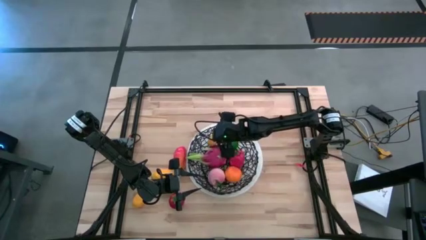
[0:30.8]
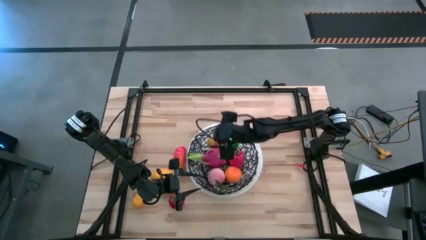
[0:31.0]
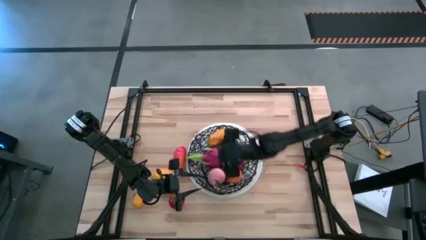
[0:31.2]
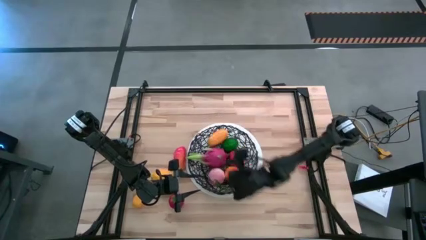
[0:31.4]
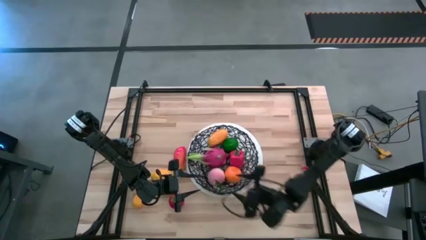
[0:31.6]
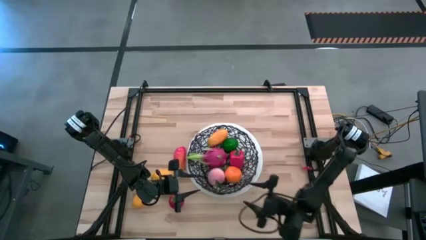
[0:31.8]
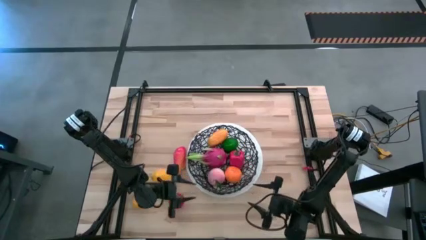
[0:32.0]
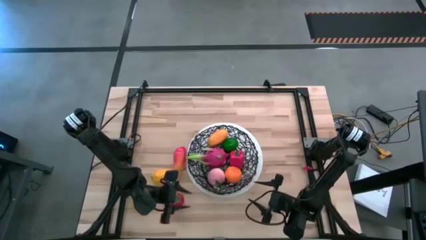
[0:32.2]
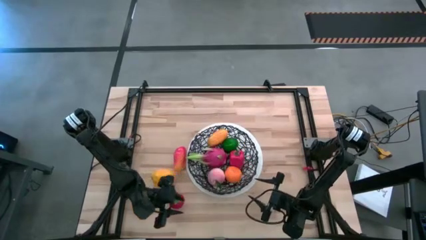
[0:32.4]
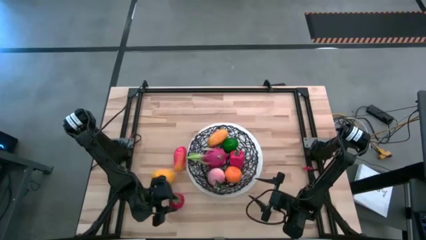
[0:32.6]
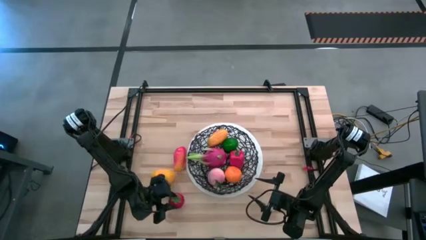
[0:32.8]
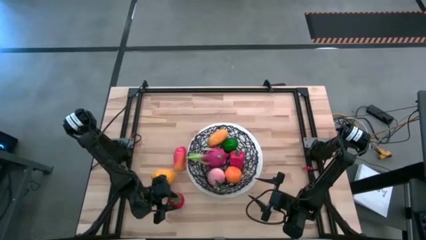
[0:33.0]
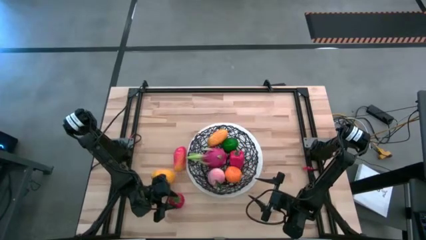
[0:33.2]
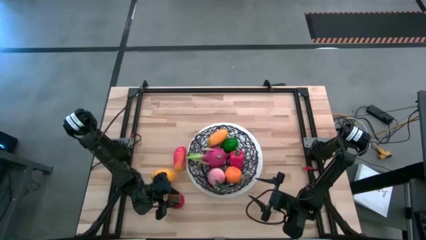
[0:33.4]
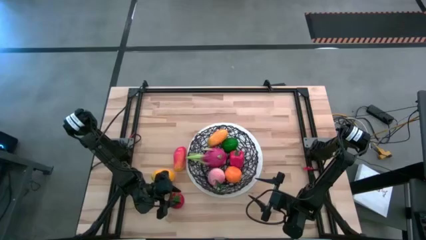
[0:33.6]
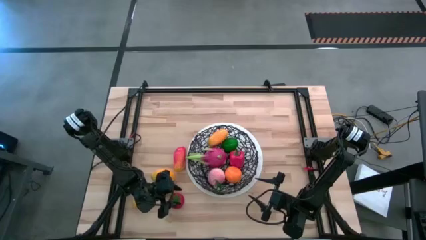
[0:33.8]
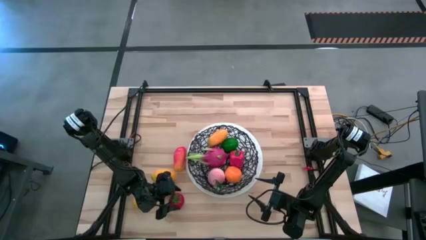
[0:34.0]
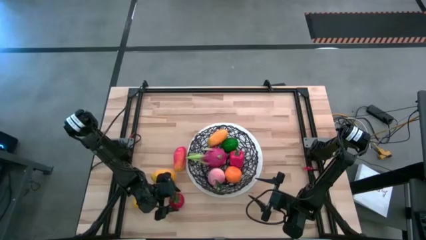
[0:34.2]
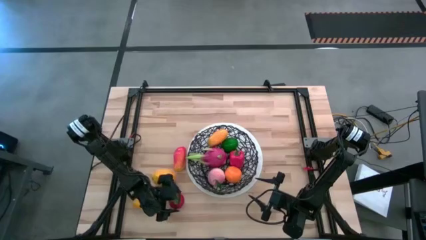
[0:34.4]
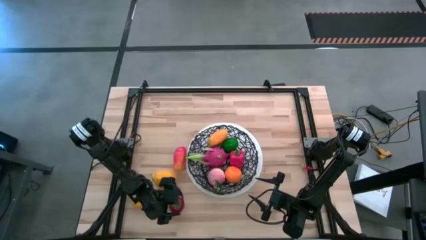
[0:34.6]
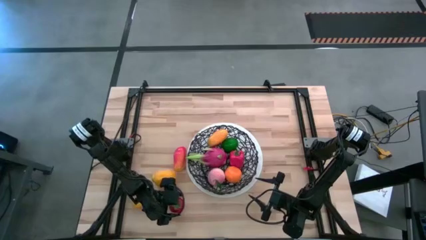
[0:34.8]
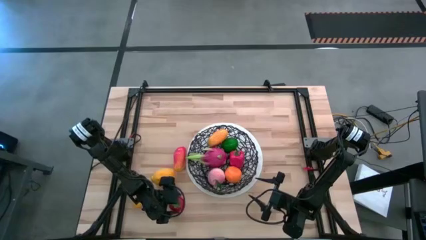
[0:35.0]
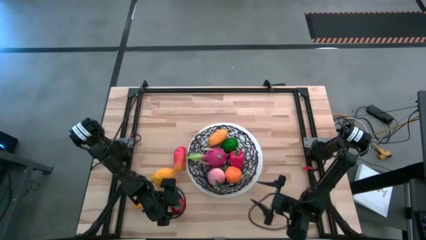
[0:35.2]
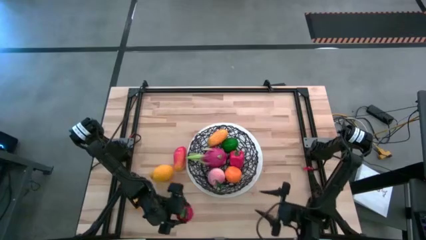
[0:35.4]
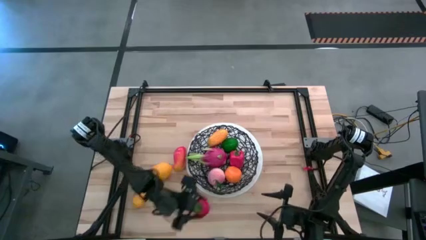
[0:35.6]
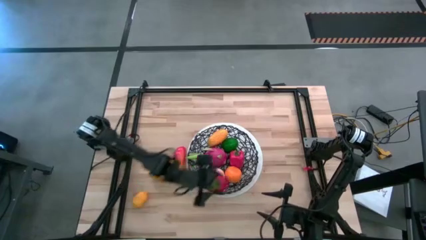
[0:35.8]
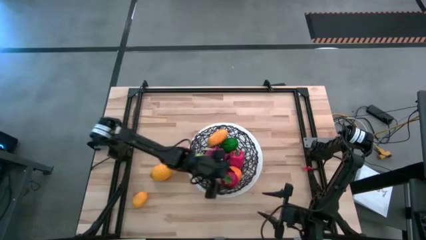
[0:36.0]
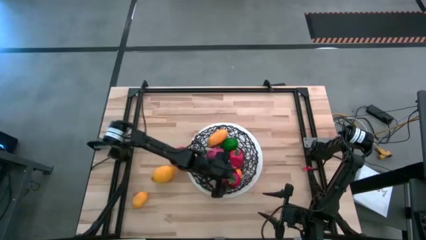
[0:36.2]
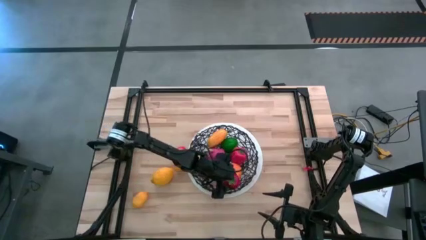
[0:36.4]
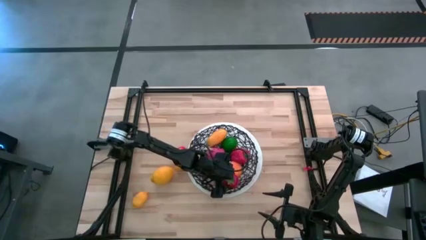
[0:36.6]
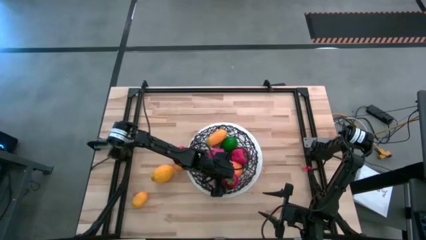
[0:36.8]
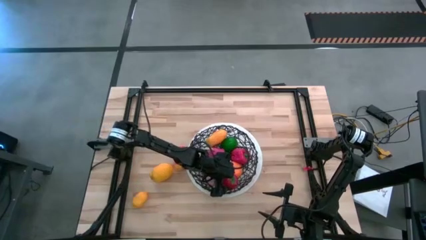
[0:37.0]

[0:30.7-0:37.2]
Task: Build produce basket
Put the tomato into the basket

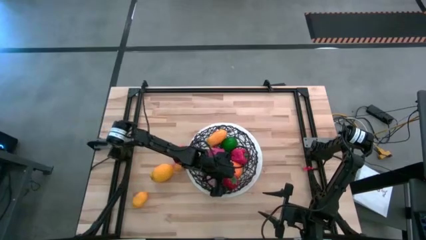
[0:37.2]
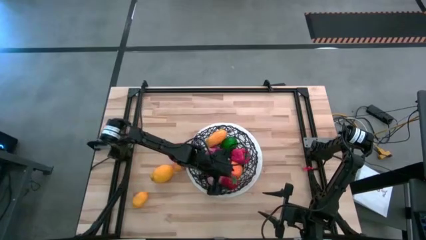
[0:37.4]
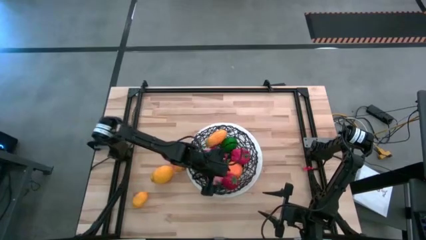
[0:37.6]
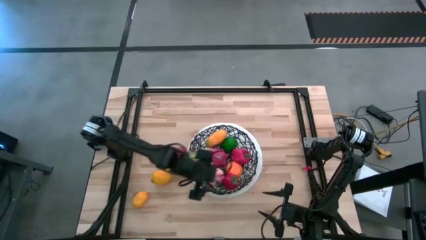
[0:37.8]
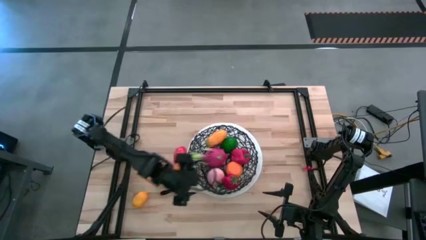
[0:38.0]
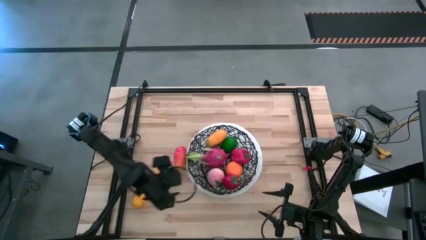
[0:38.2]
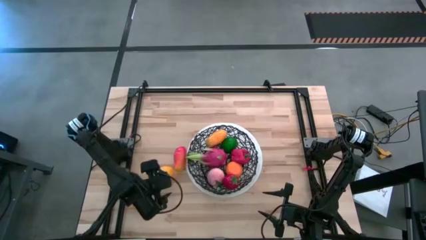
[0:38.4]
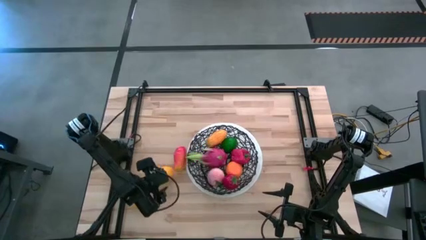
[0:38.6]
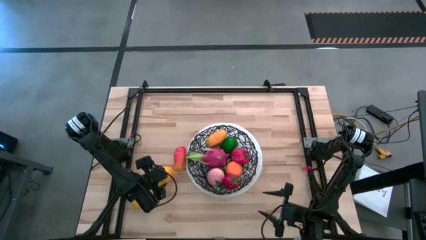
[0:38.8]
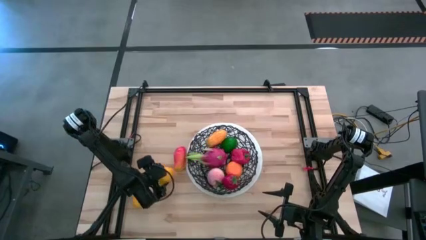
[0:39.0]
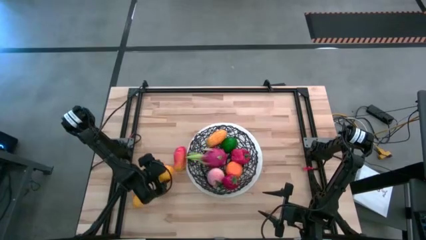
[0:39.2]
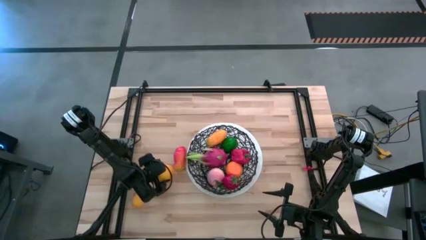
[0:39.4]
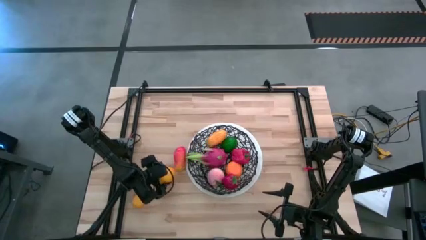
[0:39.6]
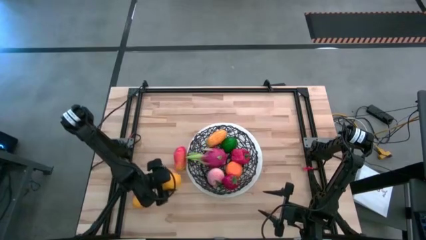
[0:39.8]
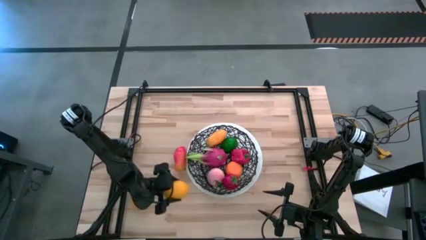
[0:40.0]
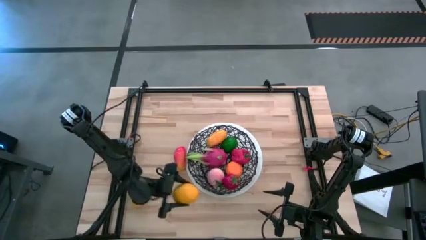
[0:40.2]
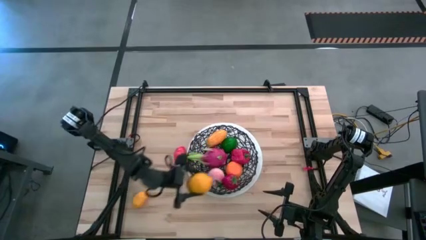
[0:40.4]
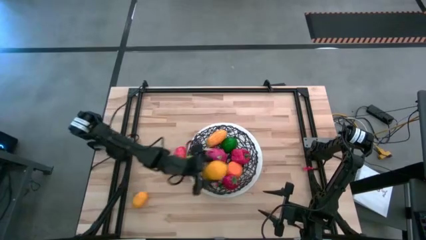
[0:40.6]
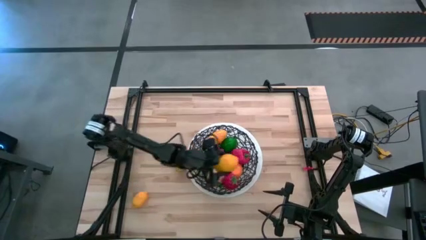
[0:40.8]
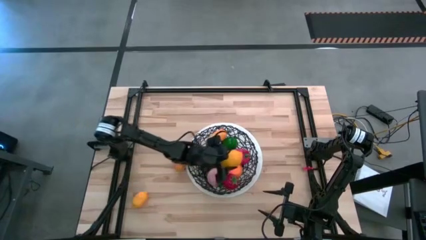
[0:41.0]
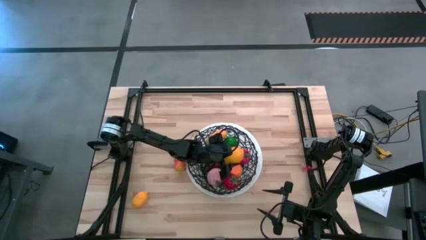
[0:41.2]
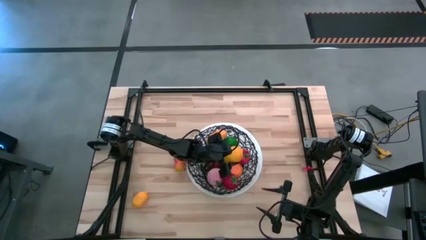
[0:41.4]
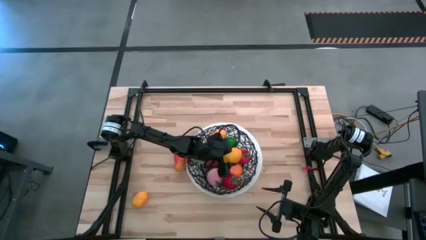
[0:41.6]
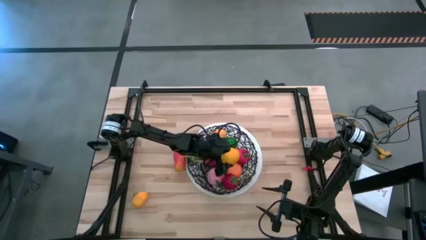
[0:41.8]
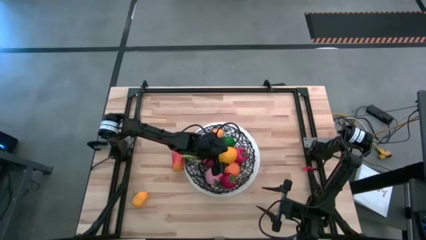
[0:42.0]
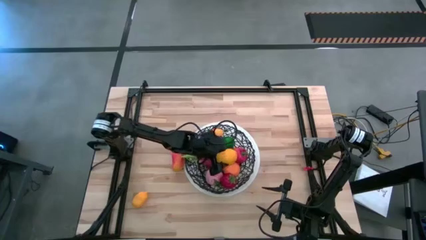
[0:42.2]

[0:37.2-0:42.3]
Put the top lemon into the basket

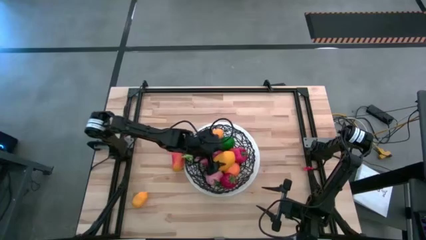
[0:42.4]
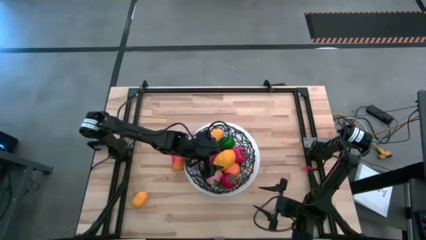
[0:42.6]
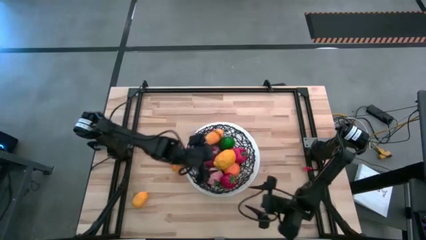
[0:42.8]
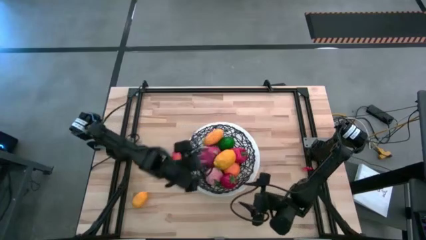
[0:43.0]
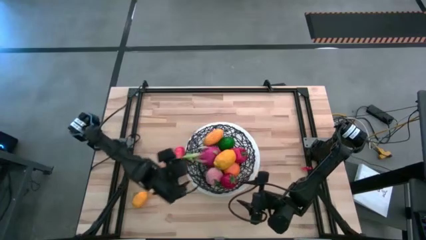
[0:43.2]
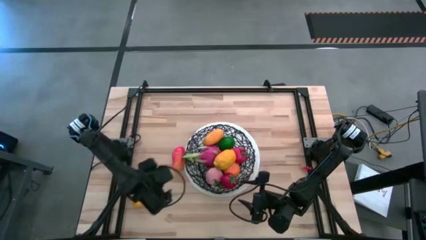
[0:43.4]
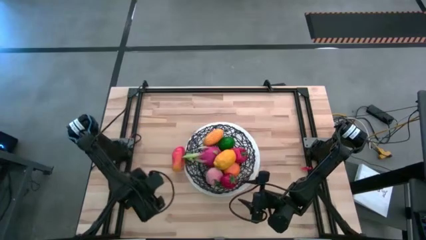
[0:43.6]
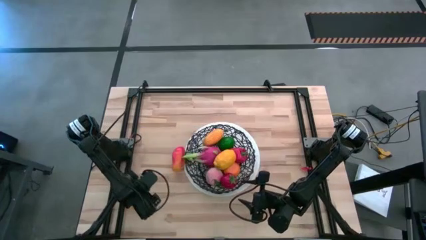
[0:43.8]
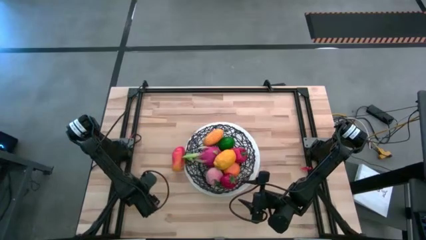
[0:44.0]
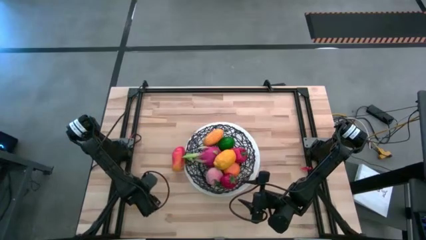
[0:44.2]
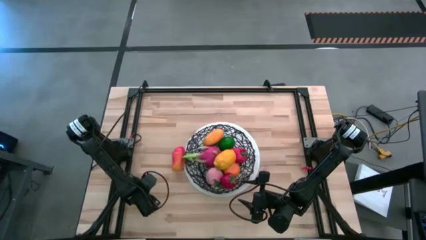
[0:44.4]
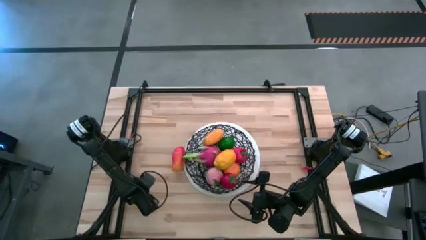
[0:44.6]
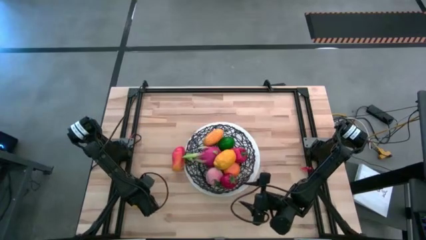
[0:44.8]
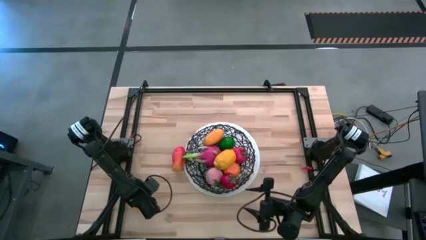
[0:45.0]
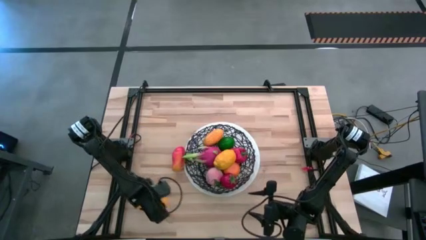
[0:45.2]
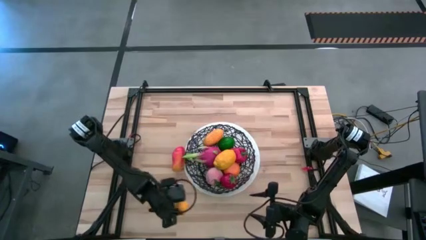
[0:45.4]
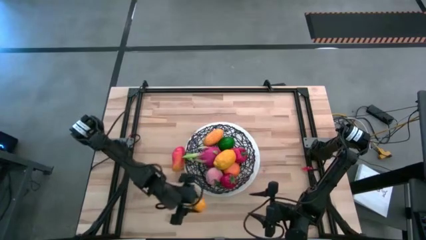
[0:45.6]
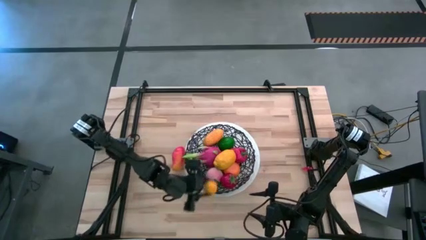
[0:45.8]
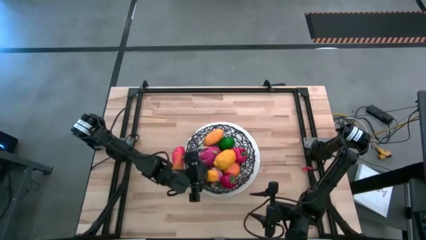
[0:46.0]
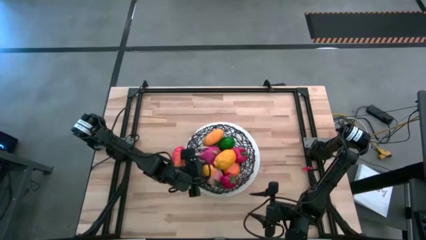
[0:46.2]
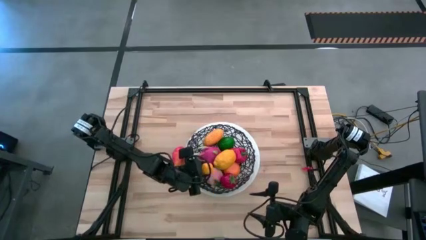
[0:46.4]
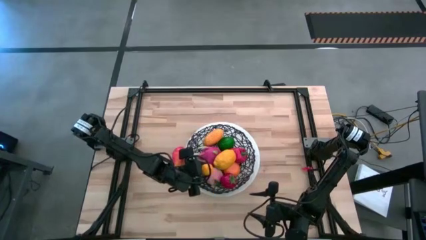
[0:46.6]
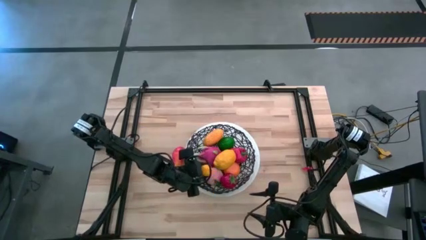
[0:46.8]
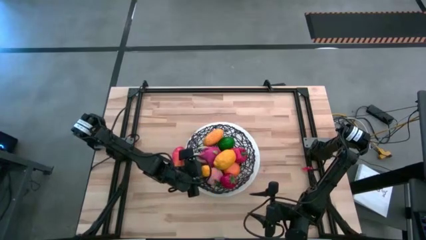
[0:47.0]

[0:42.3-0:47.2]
Put the lemon into the basket

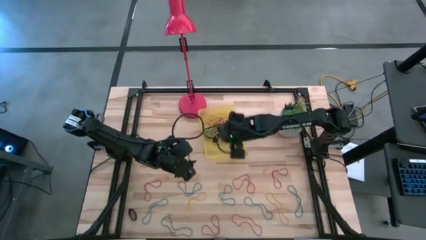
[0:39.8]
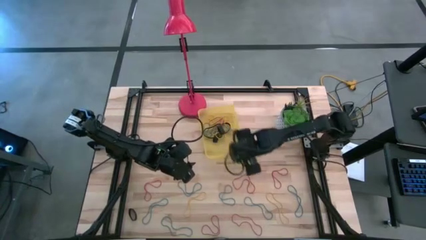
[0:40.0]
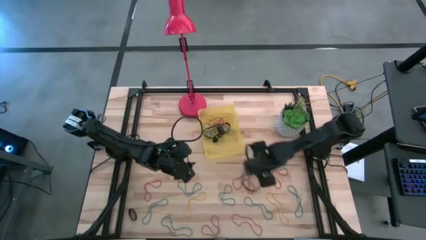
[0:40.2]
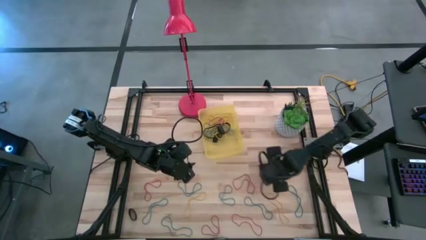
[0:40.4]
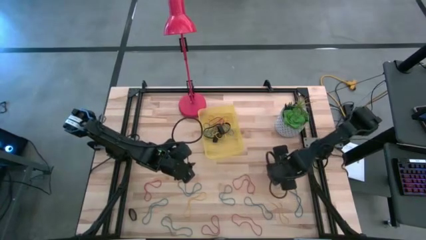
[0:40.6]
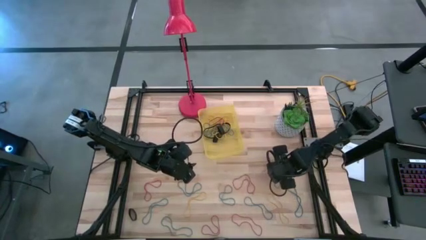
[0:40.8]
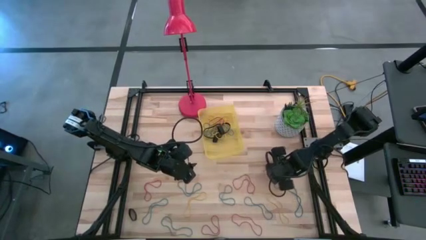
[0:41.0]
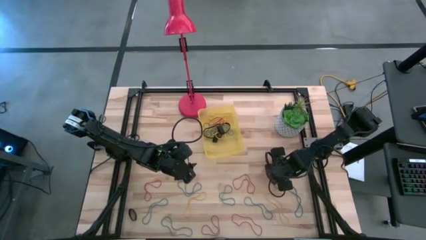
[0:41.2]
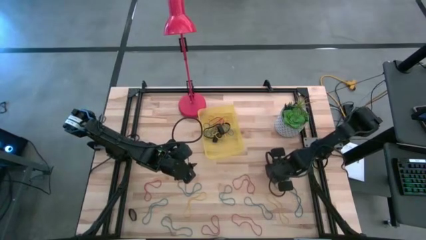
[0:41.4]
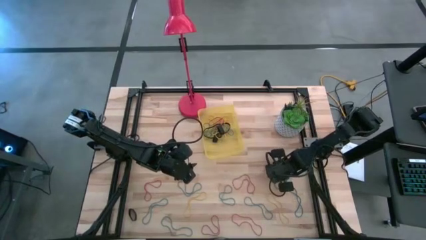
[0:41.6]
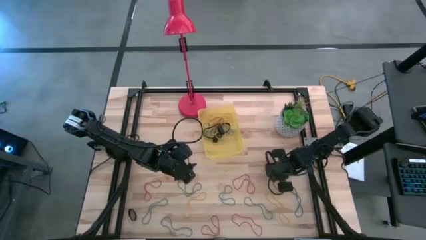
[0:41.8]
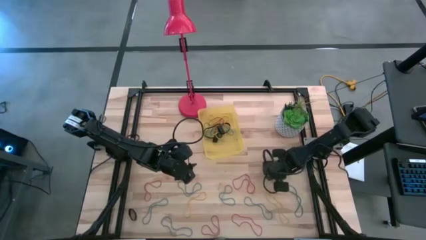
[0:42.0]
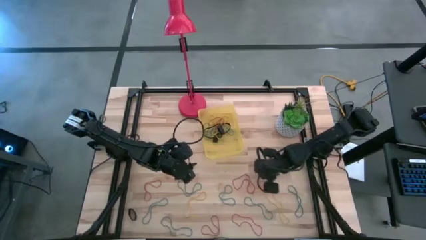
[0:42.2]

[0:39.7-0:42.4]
Task: Pick and place rubber bands into bin
Put the red rubber band into the yellow bin
